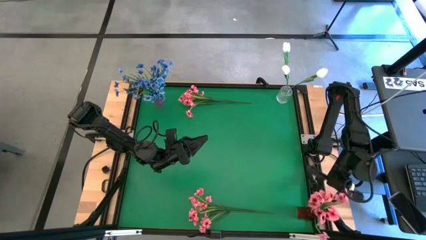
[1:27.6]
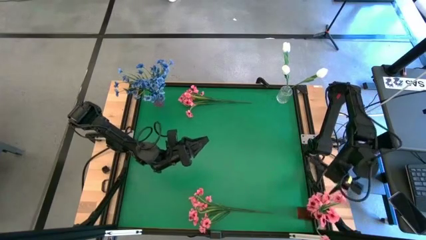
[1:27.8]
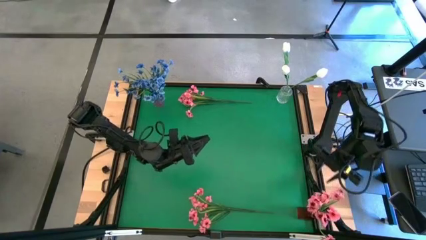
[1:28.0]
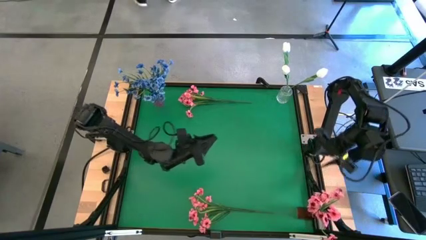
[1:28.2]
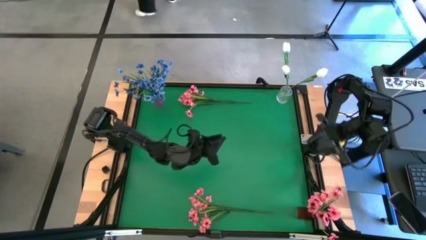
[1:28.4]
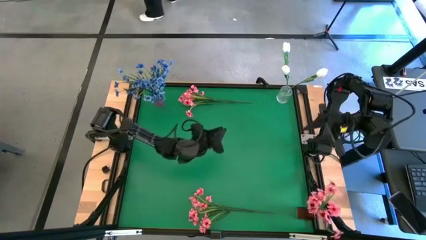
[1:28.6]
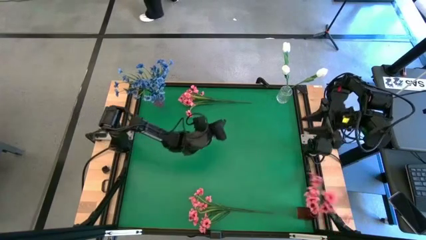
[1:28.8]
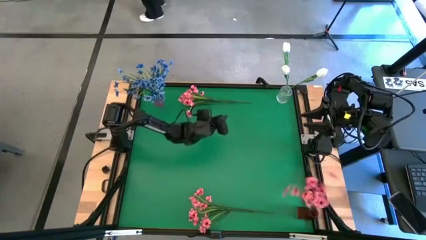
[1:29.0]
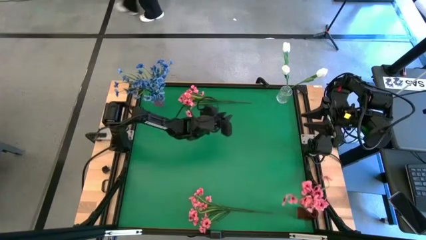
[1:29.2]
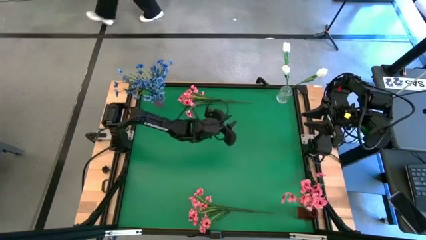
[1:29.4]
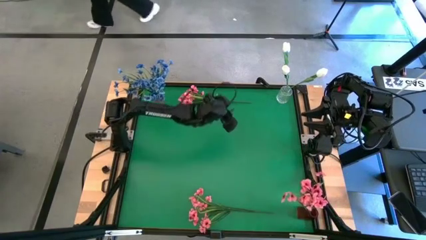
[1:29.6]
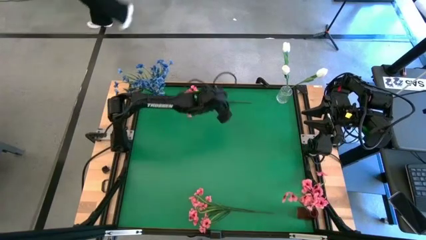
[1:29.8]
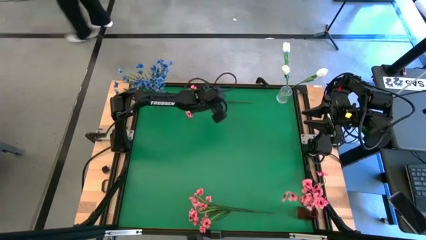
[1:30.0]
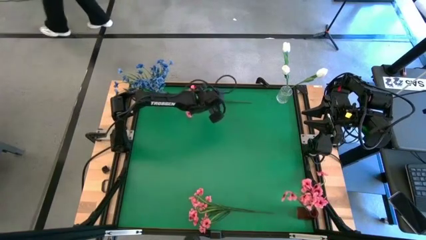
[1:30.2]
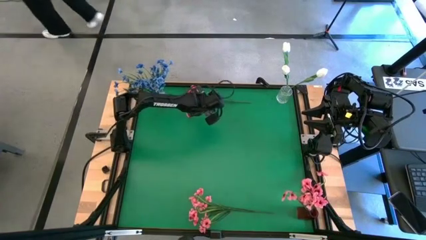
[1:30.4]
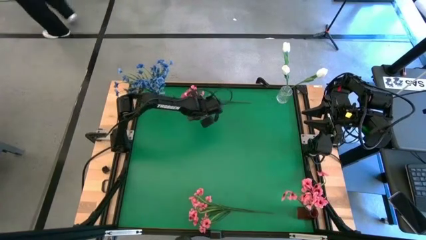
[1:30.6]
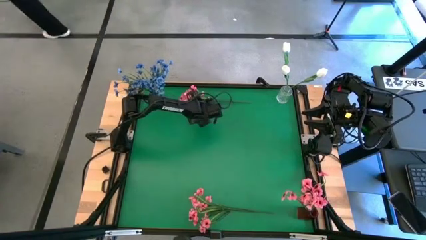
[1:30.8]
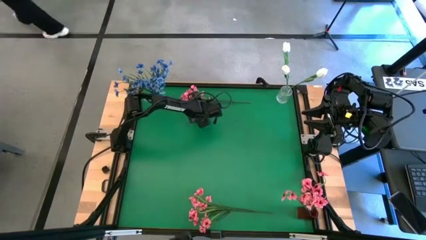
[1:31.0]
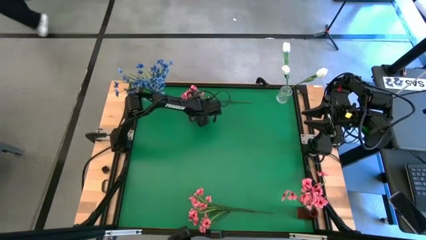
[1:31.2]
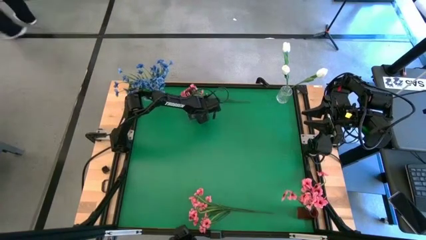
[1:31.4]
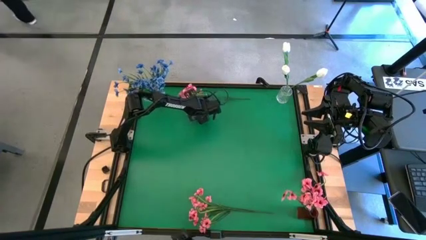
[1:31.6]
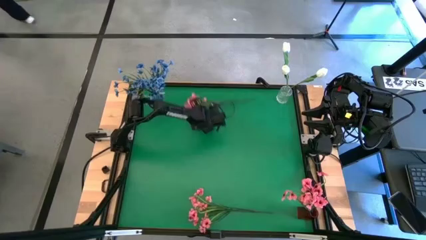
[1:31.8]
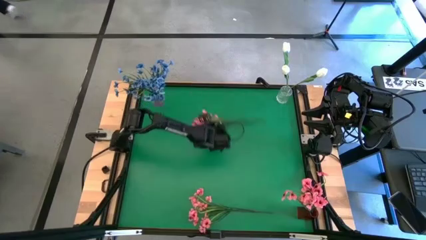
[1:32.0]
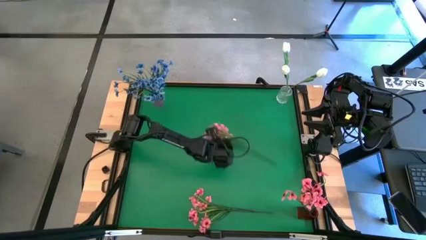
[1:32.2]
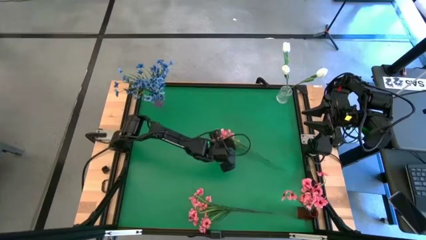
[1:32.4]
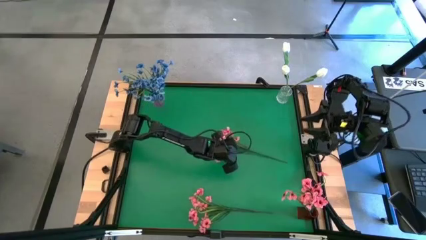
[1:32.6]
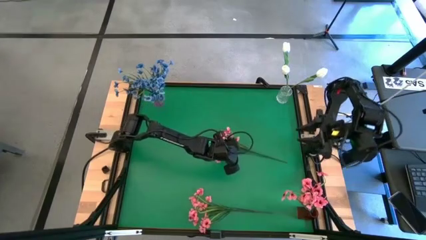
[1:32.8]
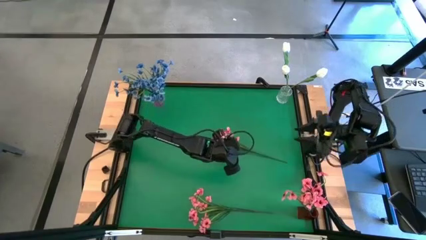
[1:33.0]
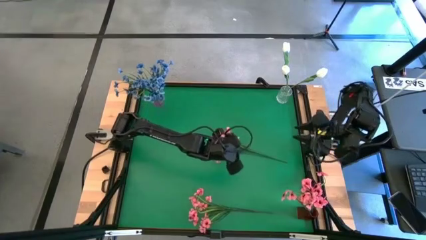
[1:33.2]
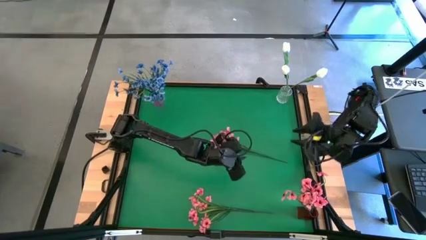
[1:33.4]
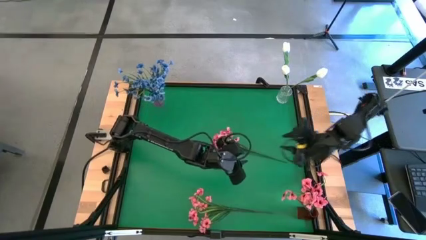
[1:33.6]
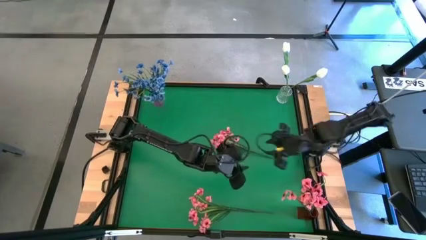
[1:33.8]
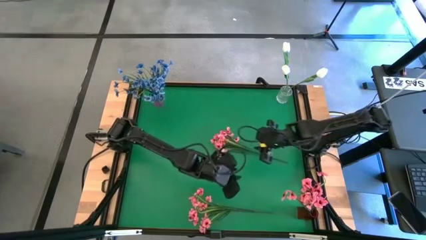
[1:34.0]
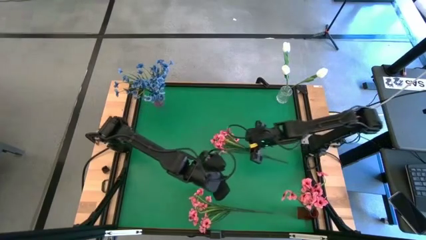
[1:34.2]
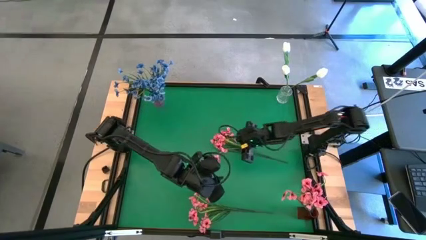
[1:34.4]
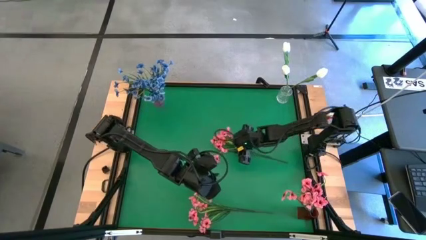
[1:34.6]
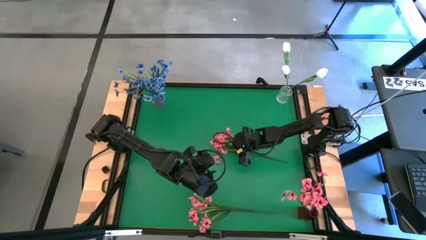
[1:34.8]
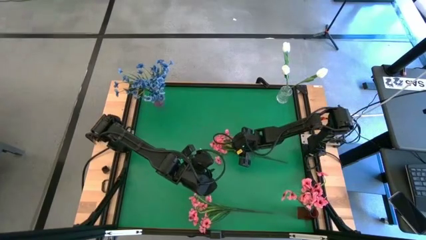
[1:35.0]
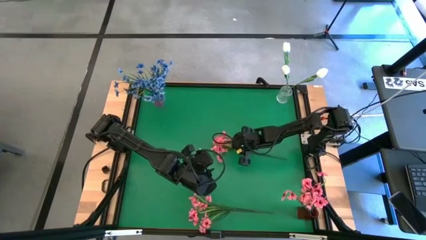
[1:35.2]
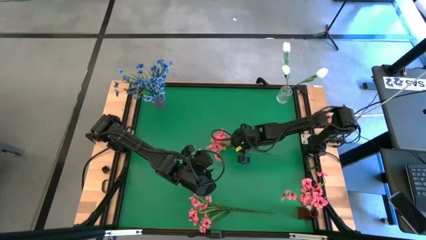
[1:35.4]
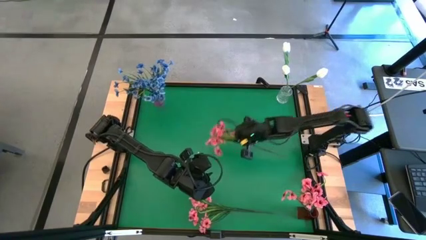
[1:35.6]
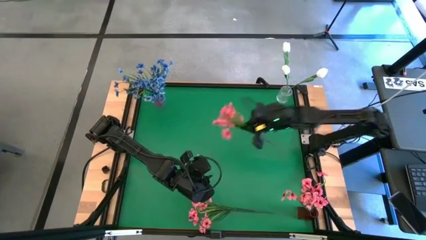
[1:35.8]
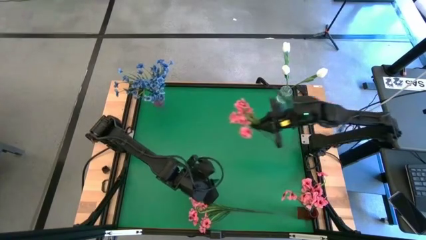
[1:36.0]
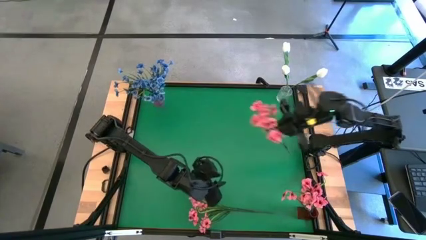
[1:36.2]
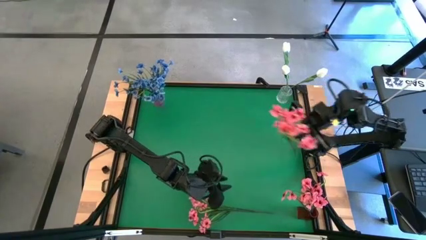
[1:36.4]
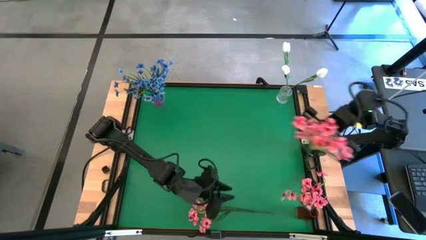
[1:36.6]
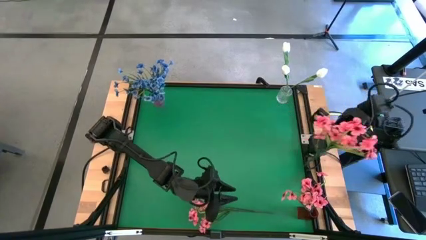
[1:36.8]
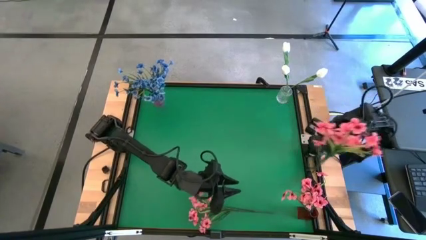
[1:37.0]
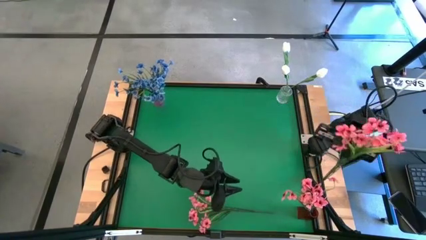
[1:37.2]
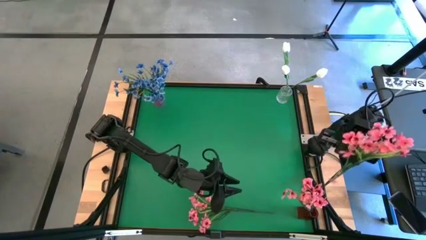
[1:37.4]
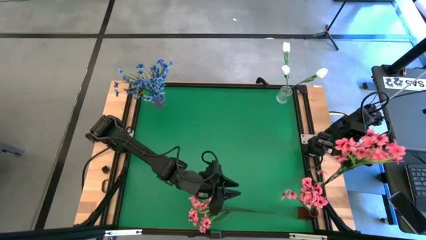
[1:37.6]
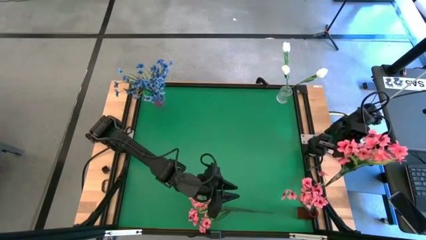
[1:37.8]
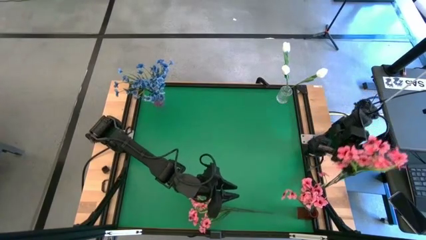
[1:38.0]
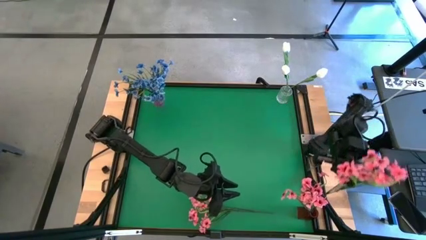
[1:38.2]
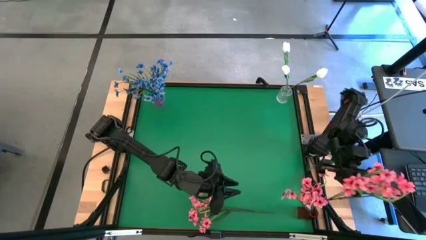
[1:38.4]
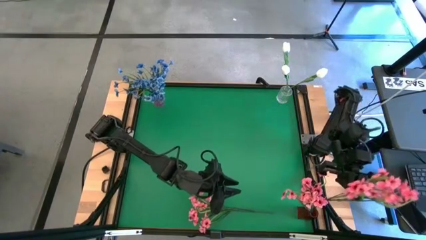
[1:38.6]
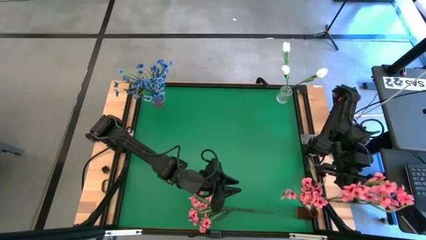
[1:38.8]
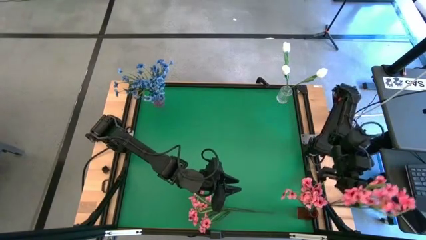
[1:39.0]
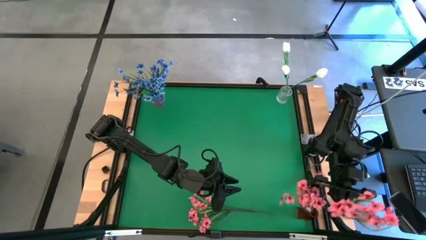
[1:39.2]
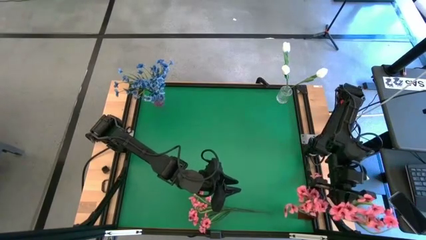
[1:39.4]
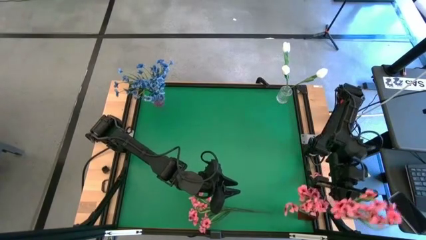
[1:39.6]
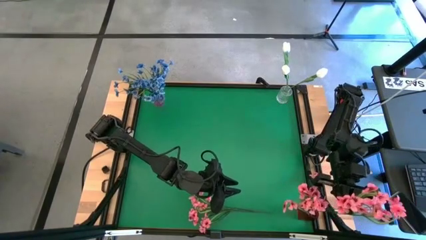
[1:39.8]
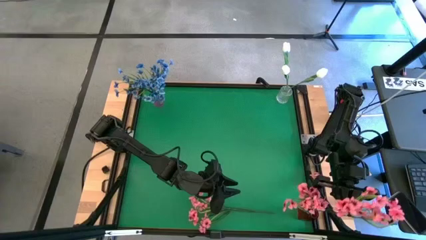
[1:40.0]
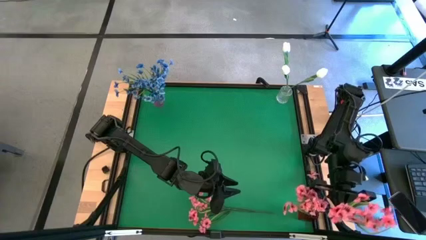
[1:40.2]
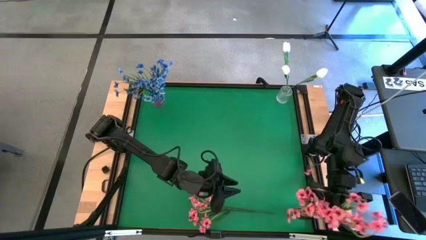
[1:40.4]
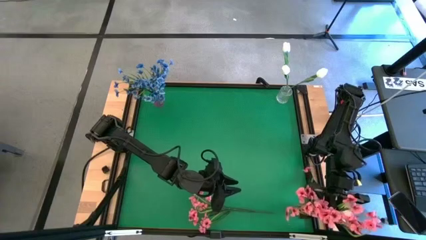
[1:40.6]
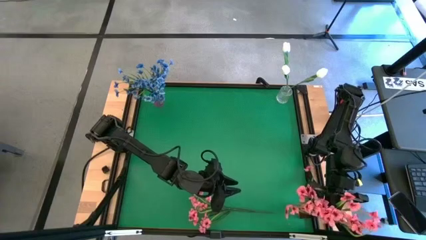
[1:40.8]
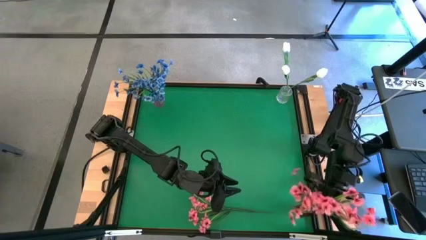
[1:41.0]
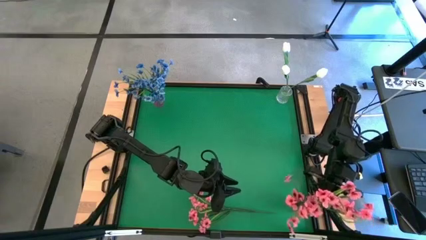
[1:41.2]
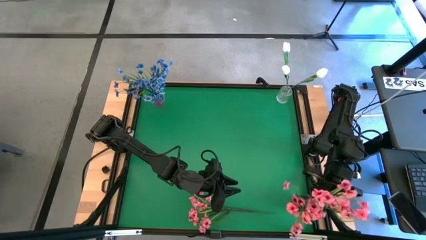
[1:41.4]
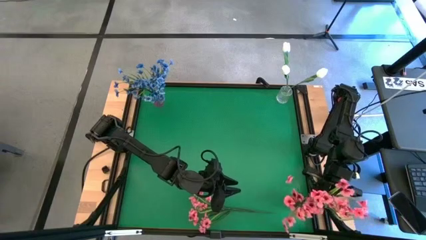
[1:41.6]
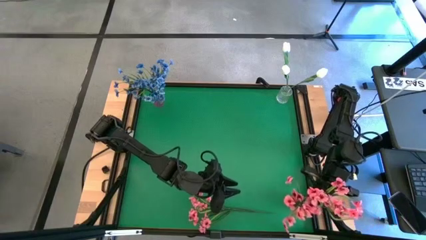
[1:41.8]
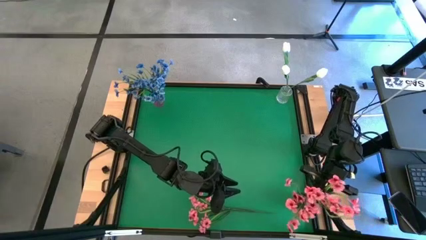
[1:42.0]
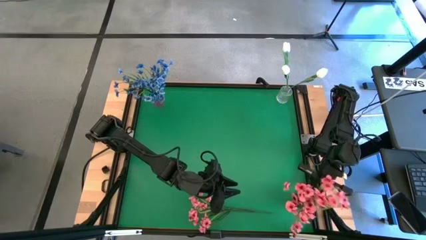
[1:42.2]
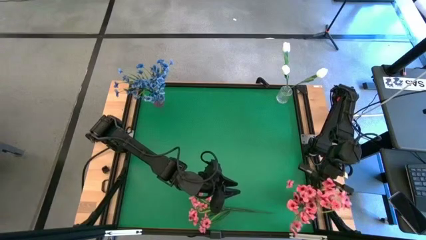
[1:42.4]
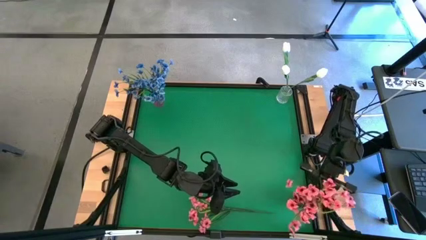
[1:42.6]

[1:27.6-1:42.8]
Task: Sort flowers into vase by color
Put the top pink flowers into the red vase

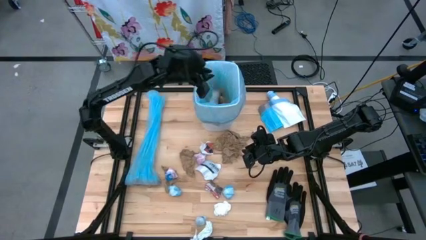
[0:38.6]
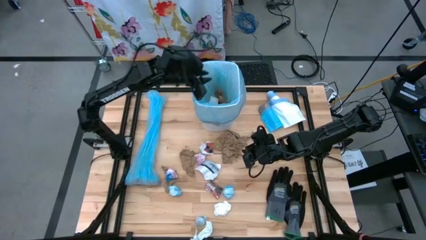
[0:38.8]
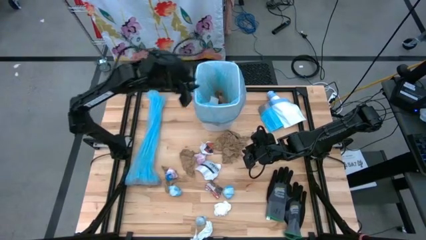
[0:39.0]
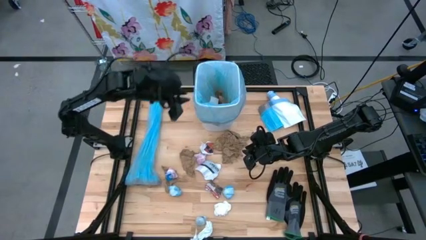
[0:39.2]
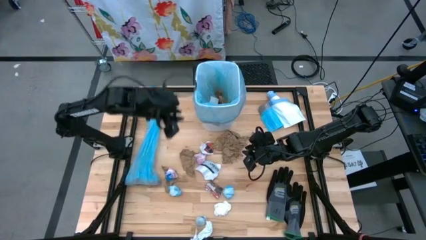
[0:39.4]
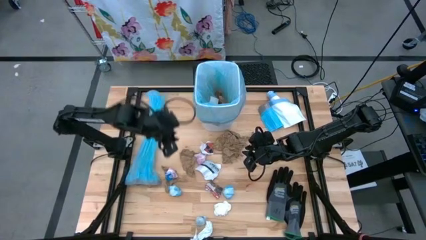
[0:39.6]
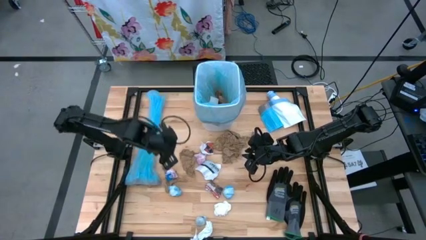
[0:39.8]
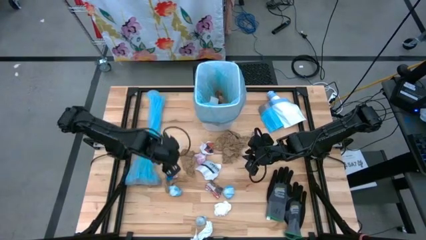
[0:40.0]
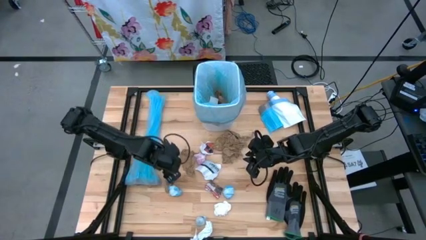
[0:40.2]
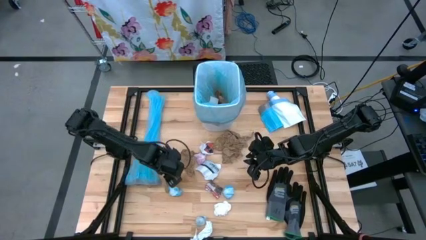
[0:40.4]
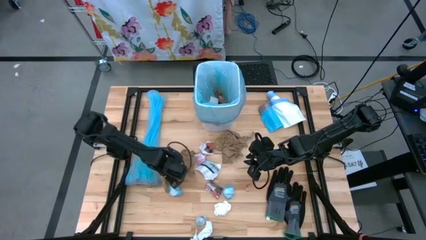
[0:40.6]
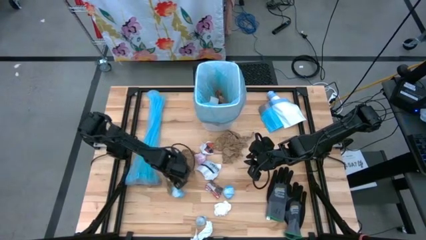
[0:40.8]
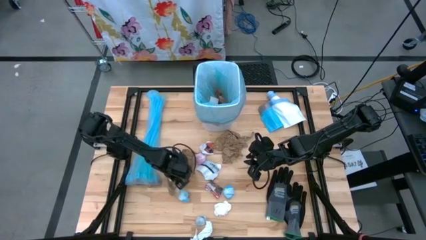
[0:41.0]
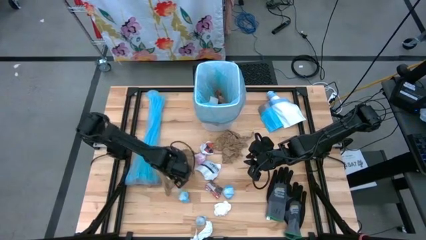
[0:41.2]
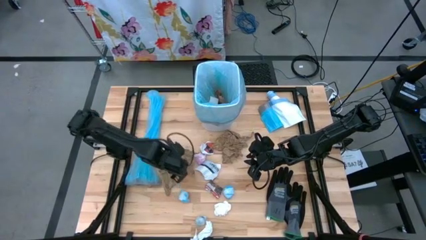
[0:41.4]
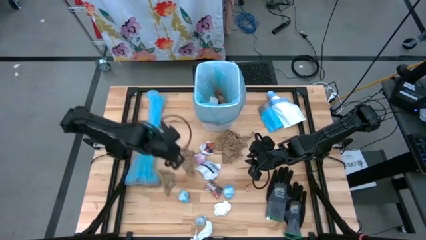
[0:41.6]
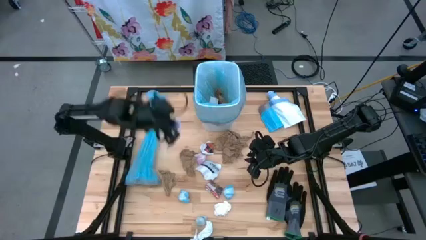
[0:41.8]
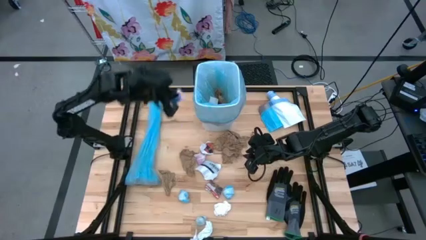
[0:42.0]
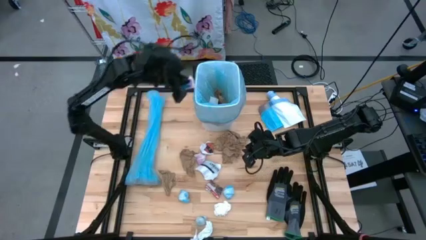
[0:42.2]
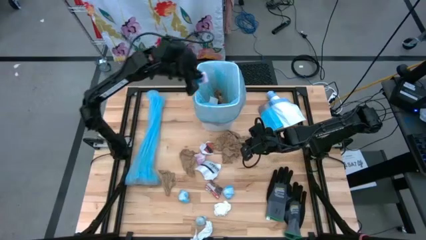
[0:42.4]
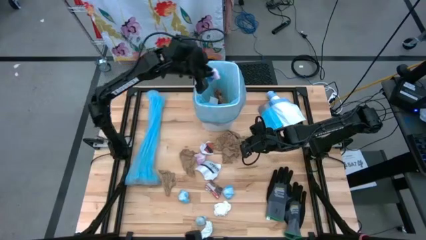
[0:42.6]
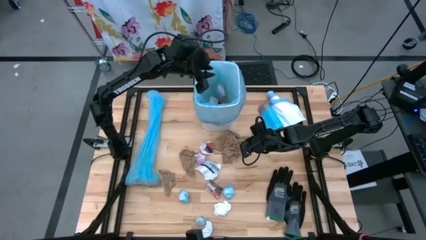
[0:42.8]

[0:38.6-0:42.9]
Task: place trash/remove bag and relplace
Put the pink plastic into the blue trash bag inside the white trash bin
